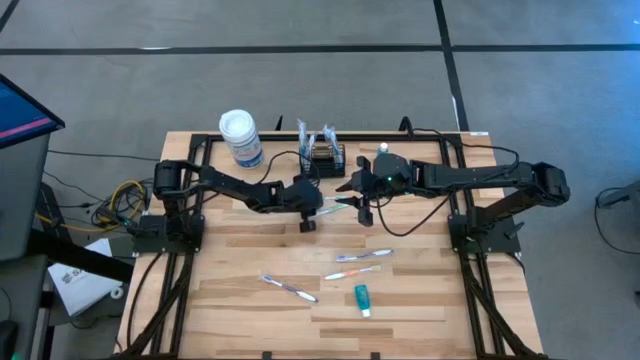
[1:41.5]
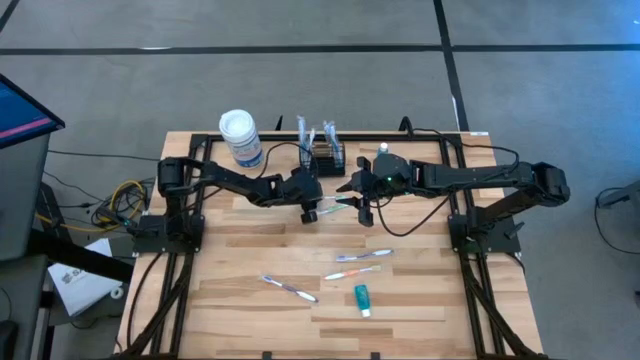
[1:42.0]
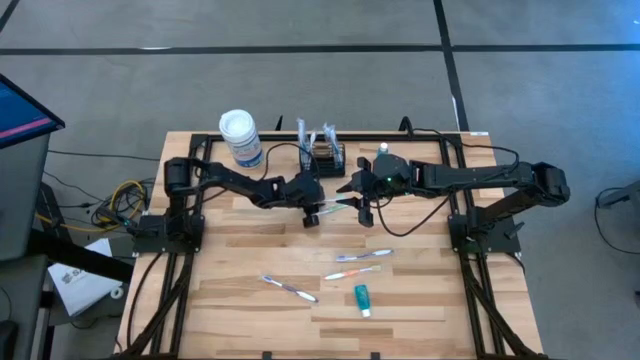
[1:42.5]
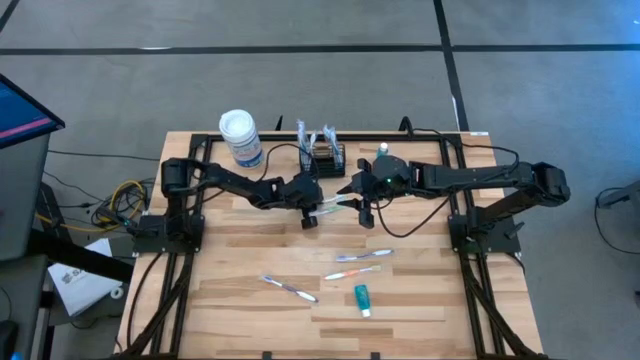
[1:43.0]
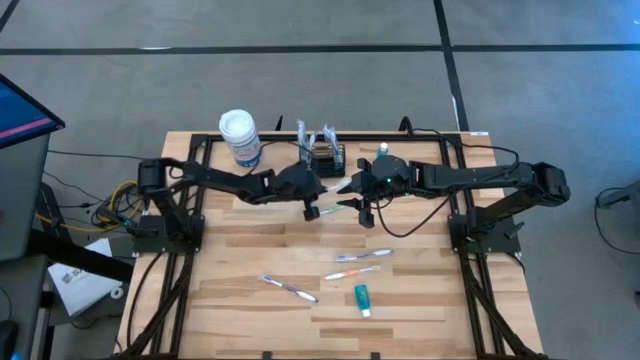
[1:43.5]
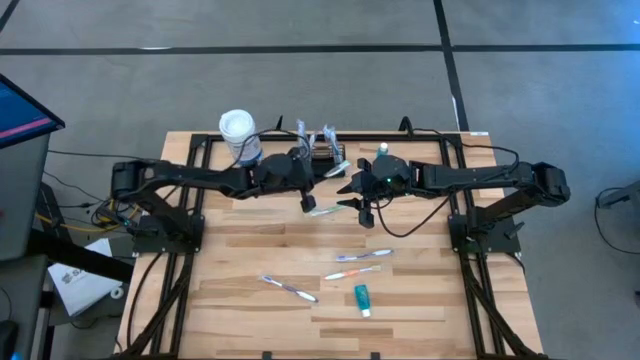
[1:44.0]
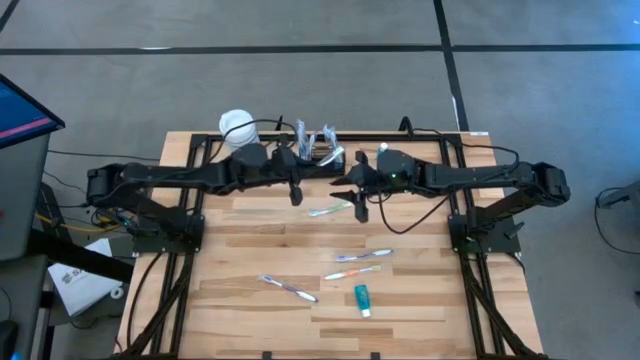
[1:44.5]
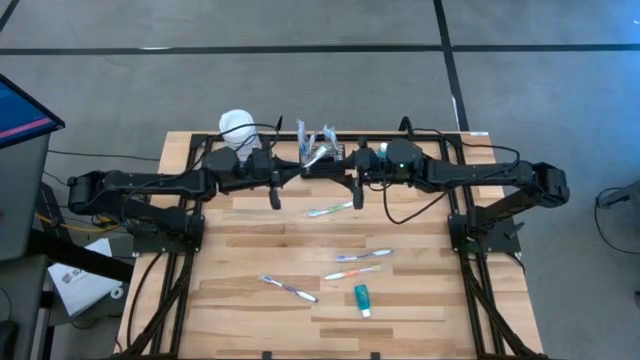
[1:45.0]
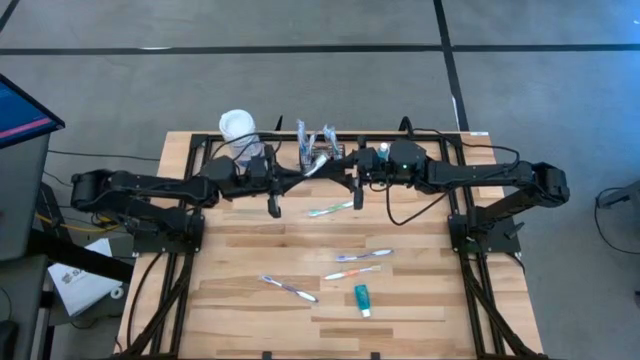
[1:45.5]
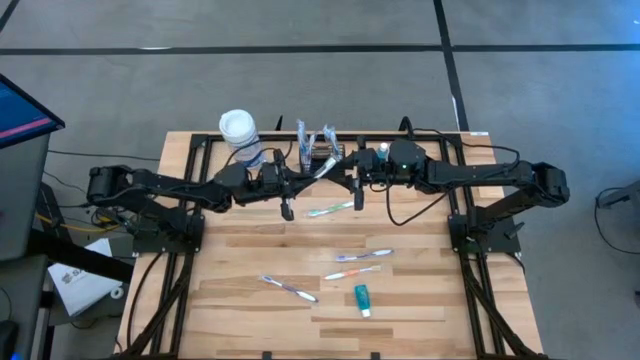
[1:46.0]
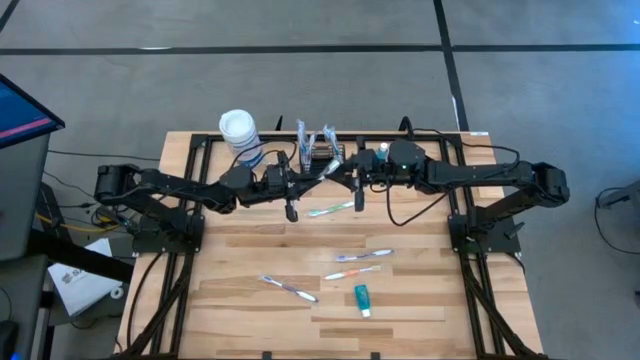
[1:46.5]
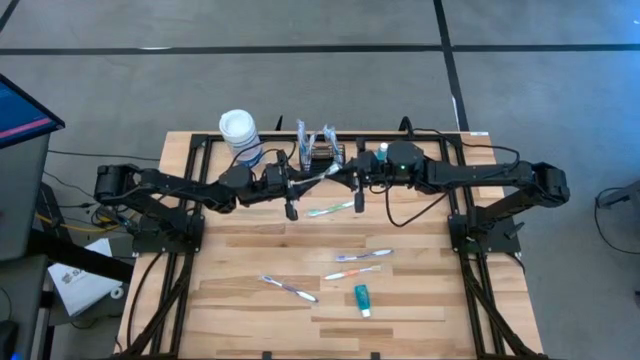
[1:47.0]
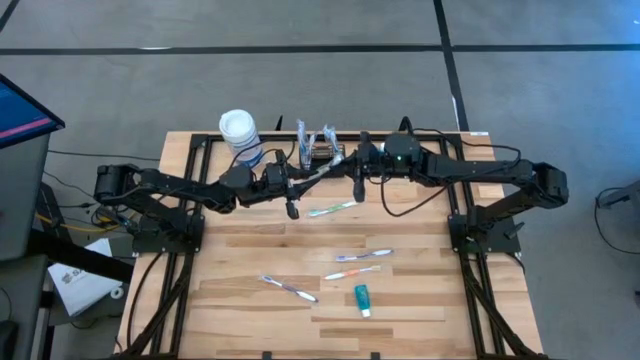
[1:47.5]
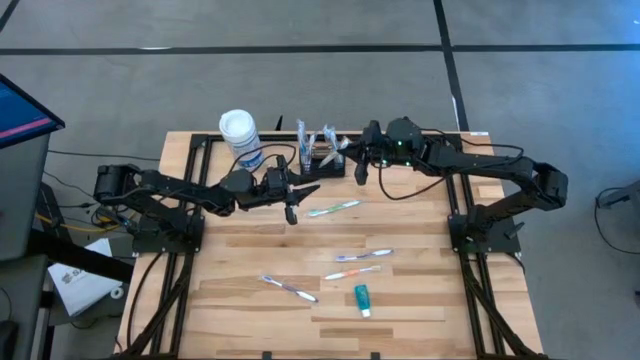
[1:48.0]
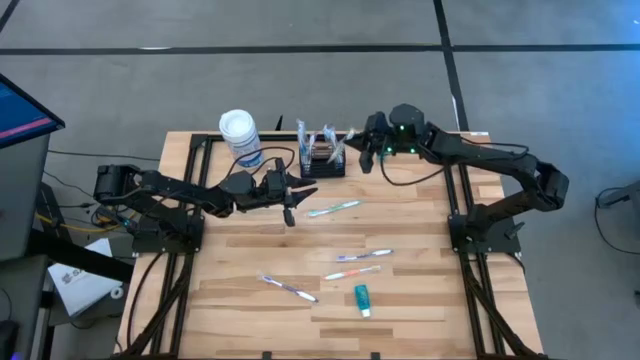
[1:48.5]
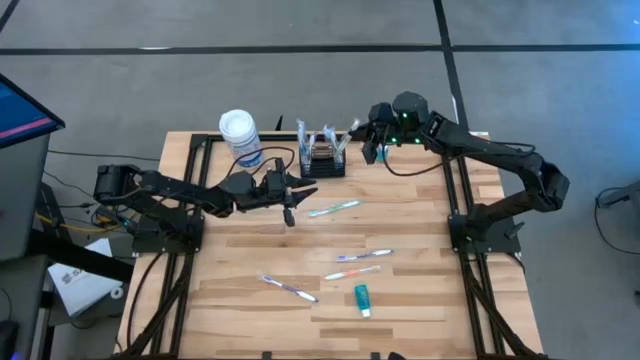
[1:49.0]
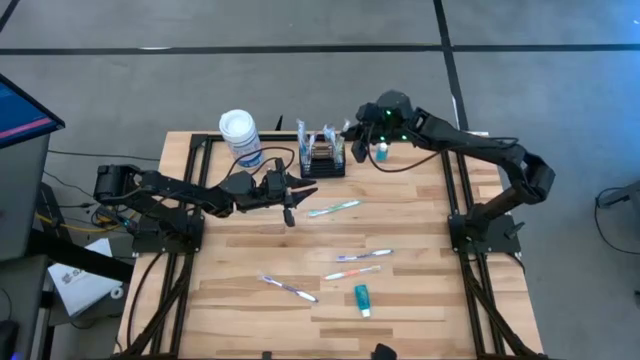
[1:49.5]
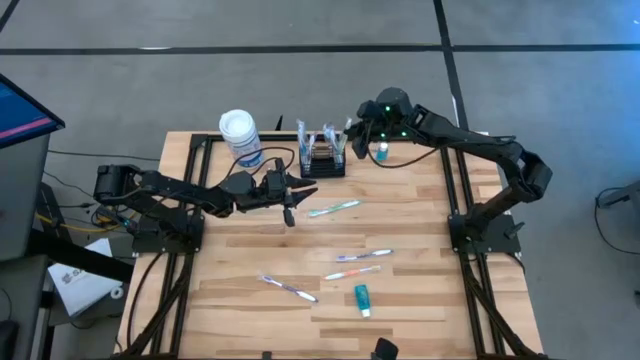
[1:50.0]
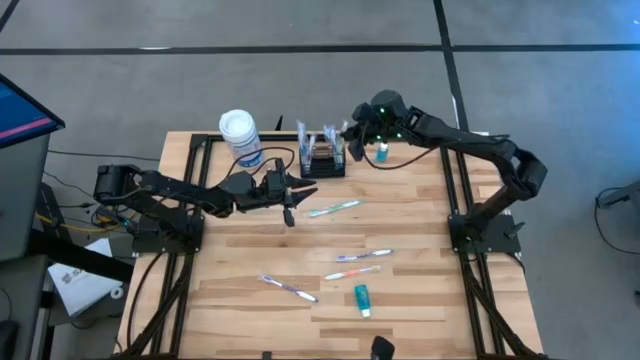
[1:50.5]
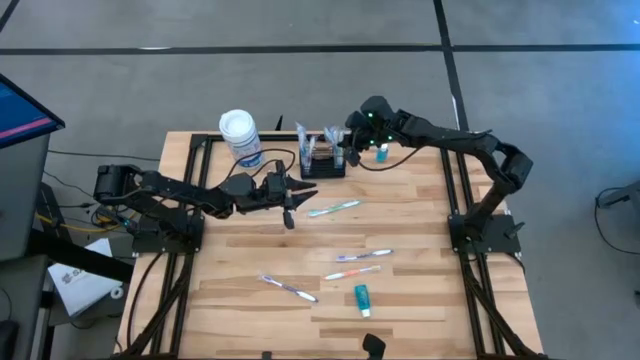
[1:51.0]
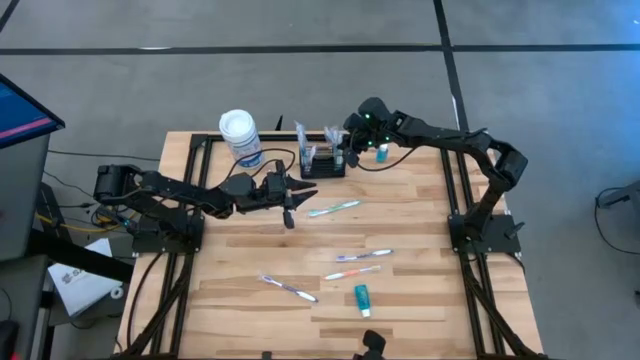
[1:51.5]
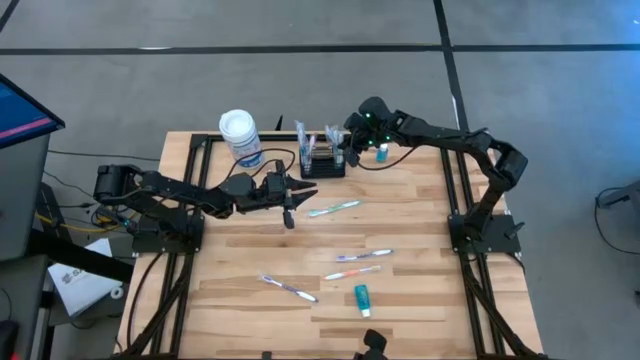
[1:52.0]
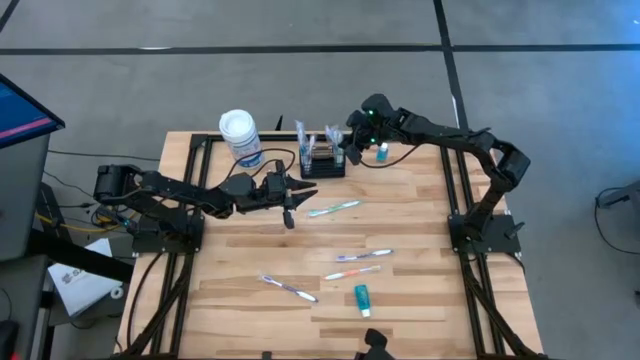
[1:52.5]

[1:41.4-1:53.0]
Task: Pick & Place toothbrushing station
Put the top green toothbrush into the black wire organizer

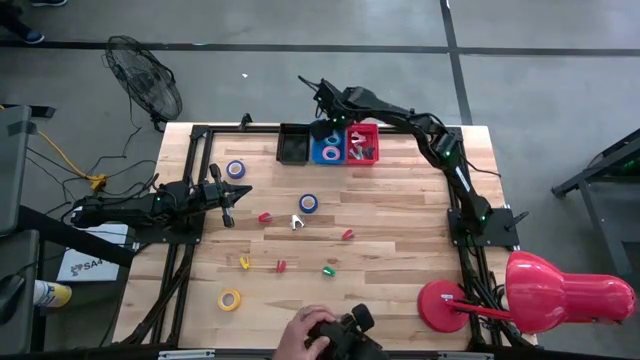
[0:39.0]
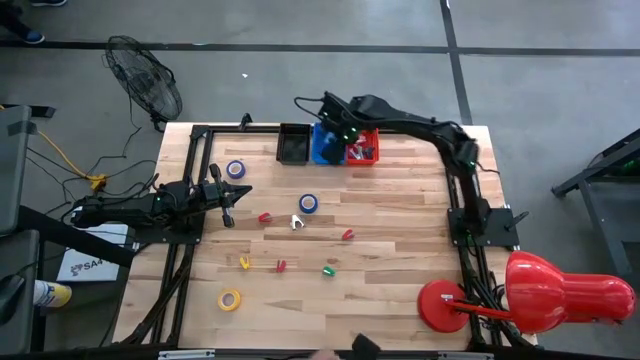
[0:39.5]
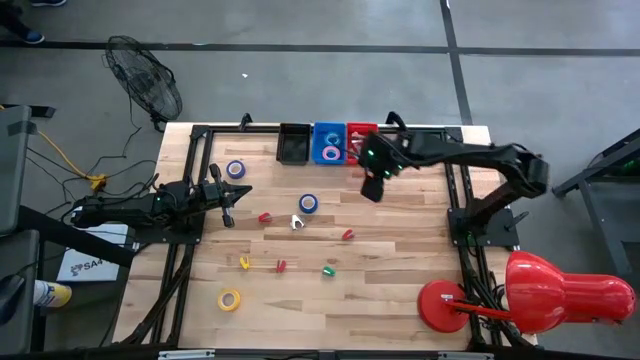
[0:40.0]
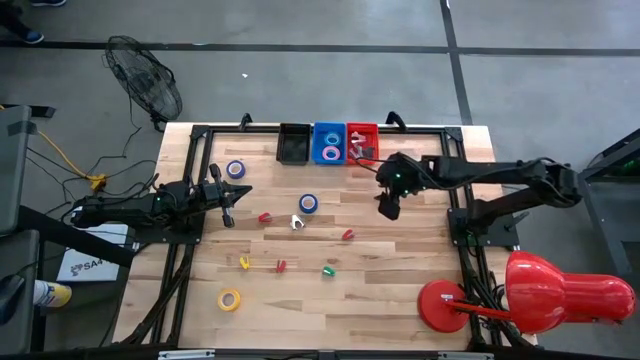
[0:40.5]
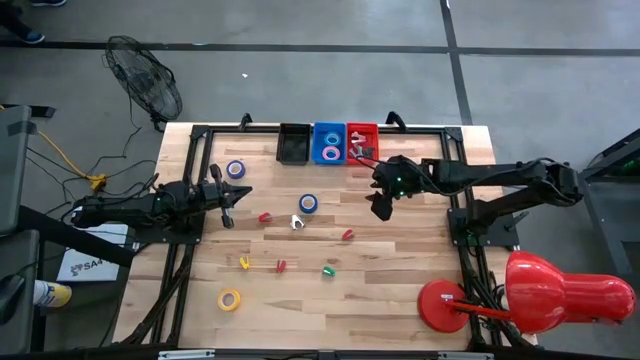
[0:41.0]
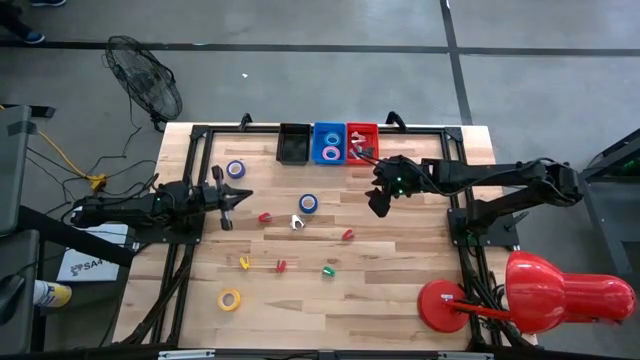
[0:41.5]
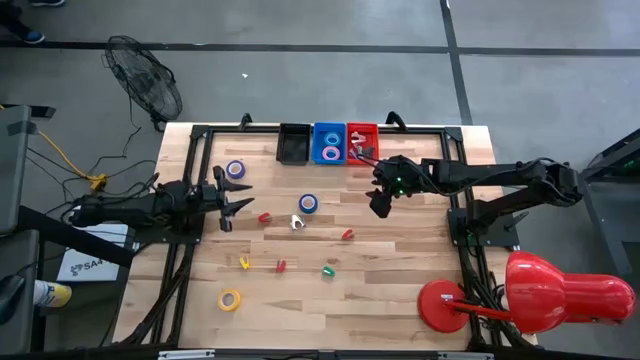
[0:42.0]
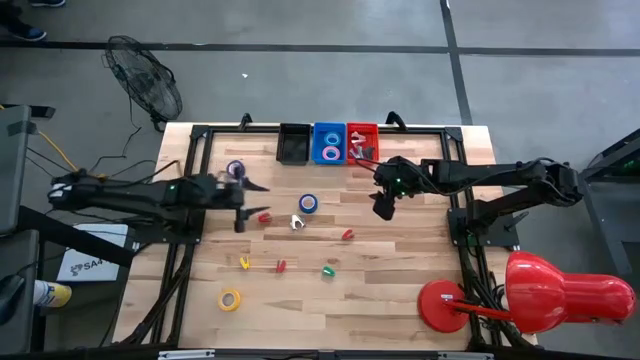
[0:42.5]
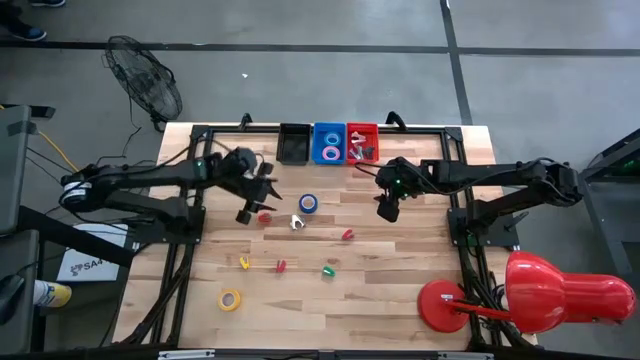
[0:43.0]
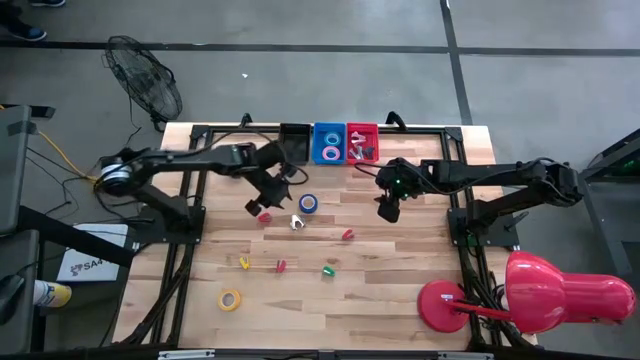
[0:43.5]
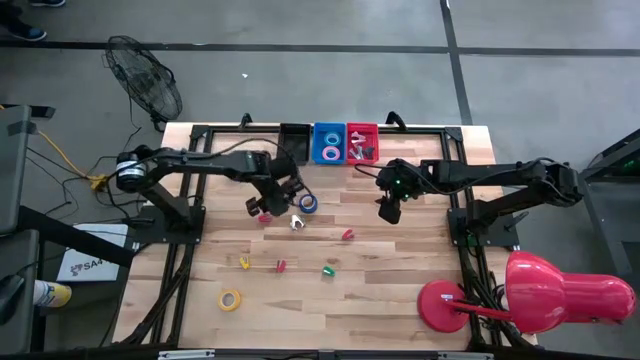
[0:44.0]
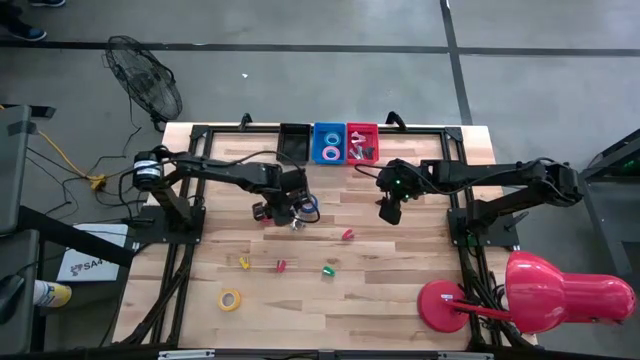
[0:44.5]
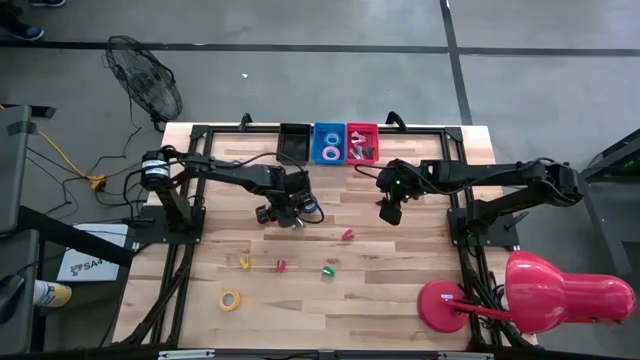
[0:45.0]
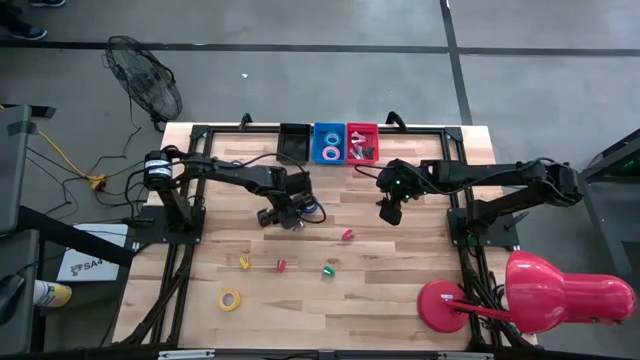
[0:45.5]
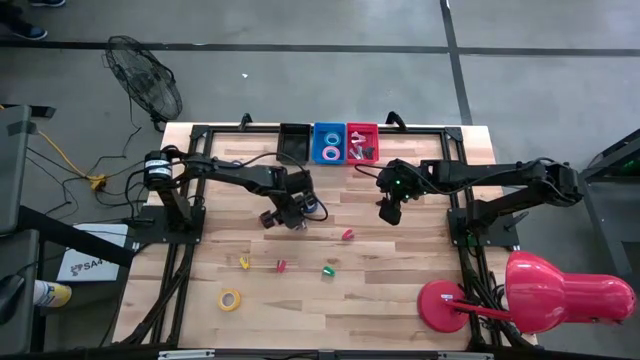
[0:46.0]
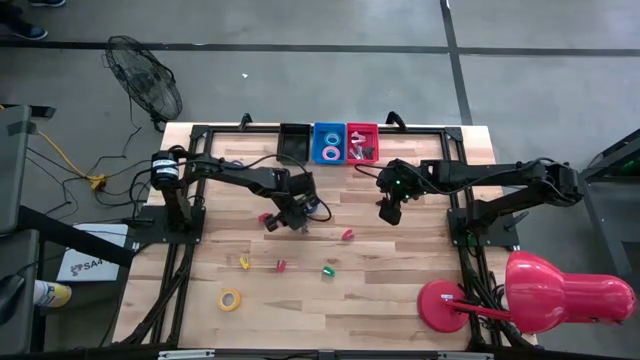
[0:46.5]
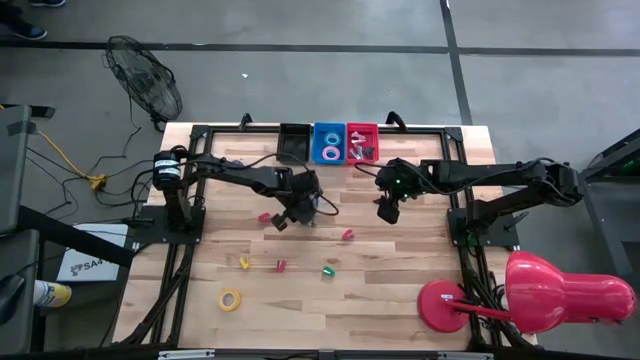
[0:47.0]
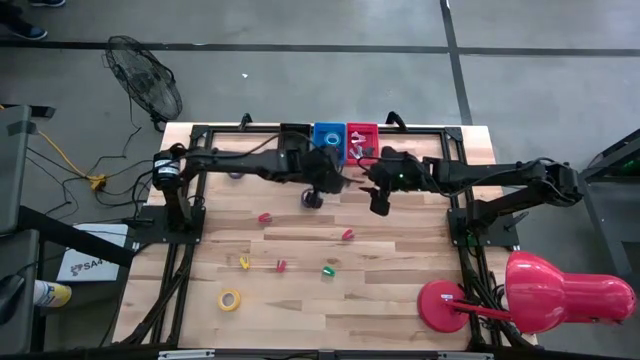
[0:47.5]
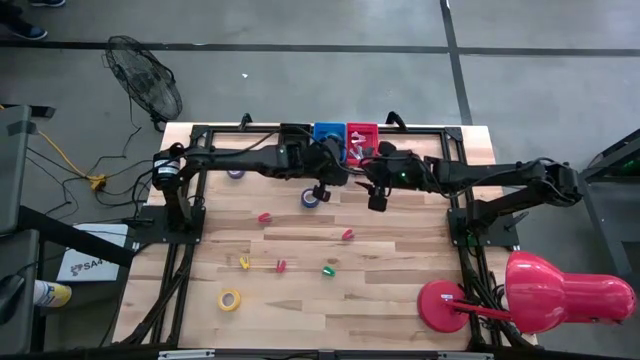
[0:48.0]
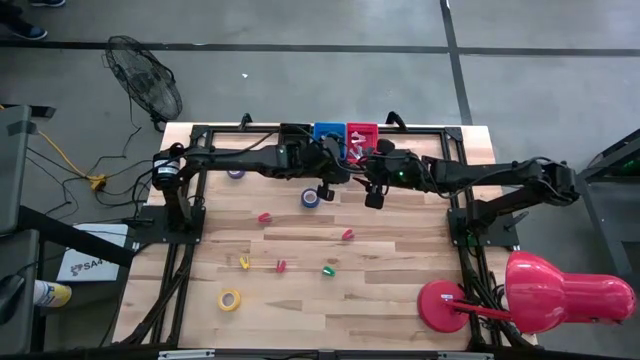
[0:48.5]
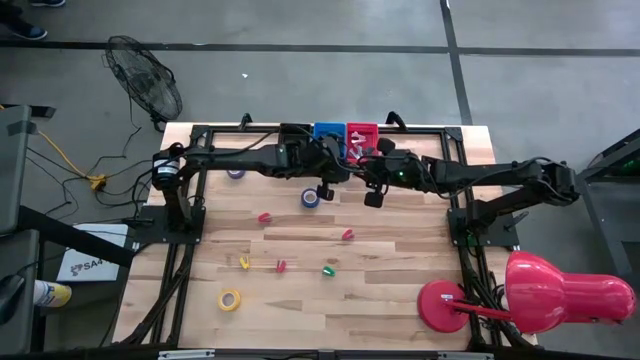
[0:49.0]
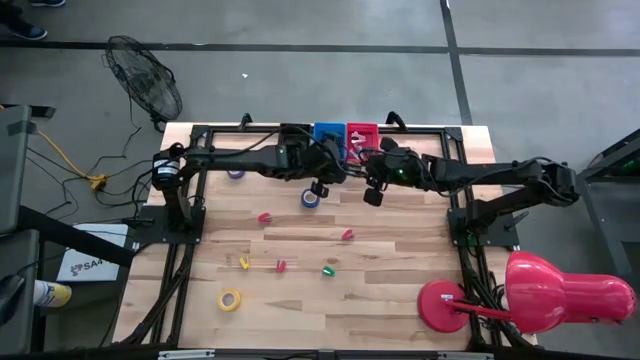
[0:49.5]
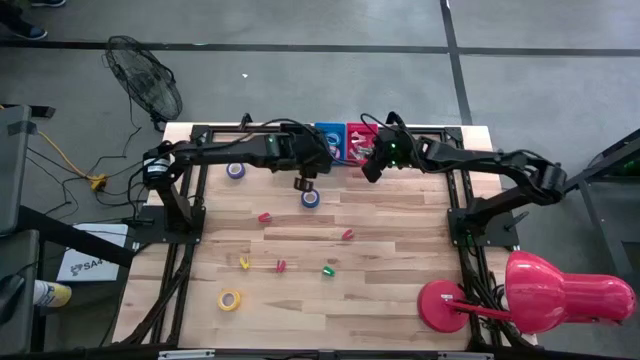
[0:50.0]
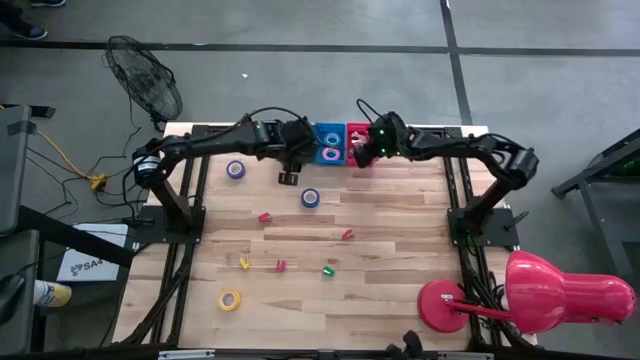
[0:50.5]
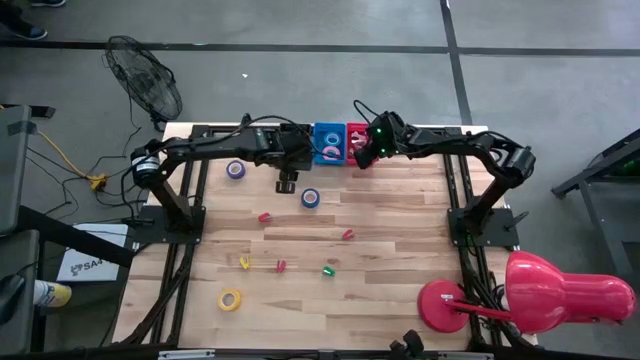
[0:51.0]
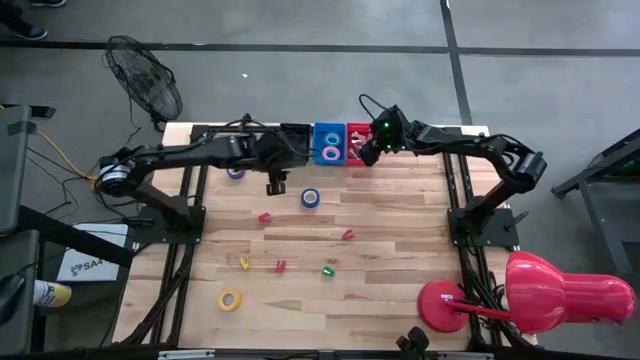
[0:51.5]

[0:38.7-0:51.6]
Task: Pick and place Stapler, Stapler remover, tape
Put the light gray staple remover into the red bin
